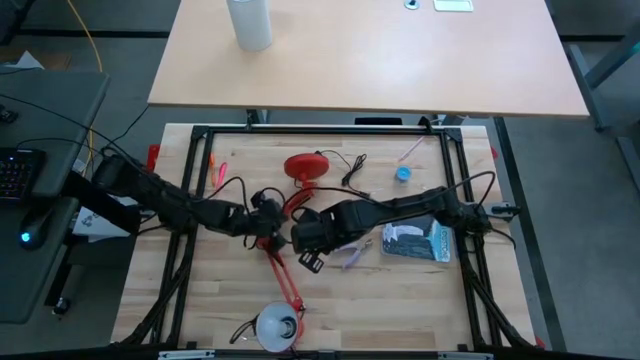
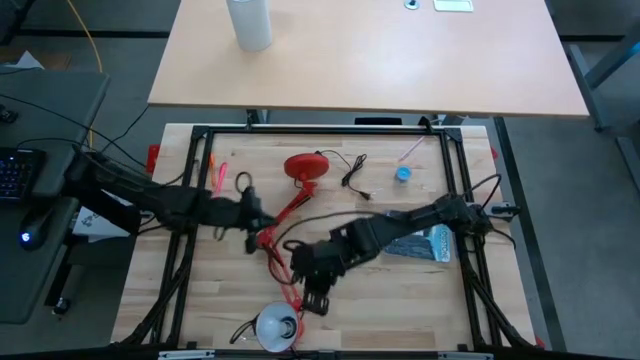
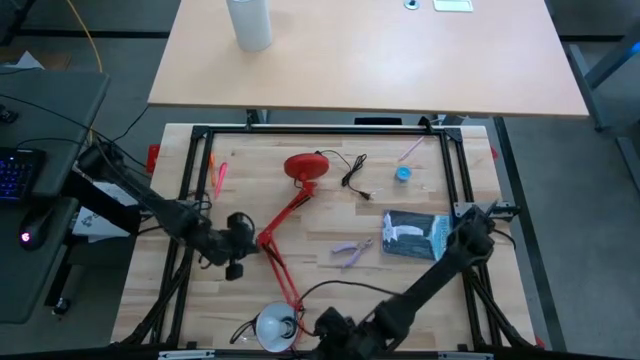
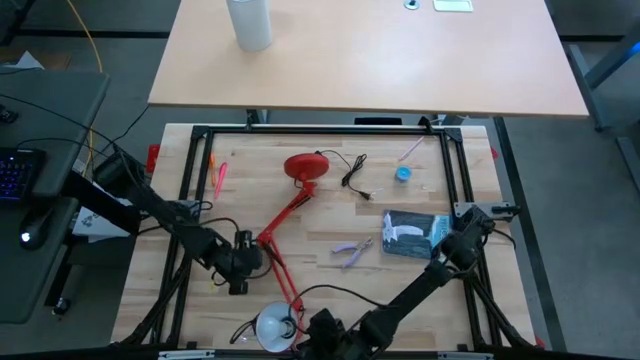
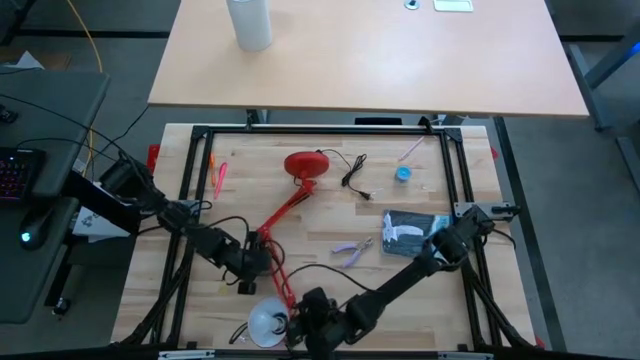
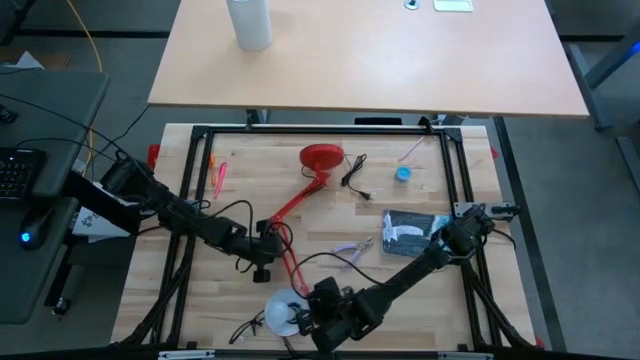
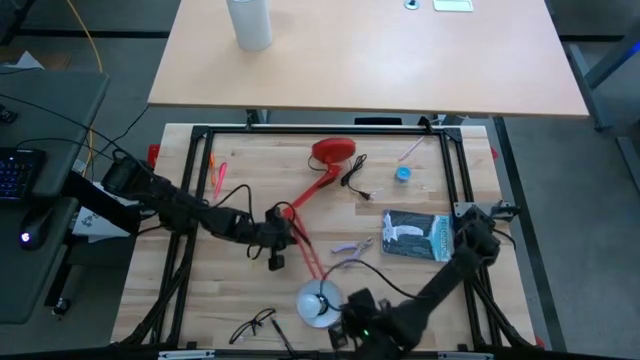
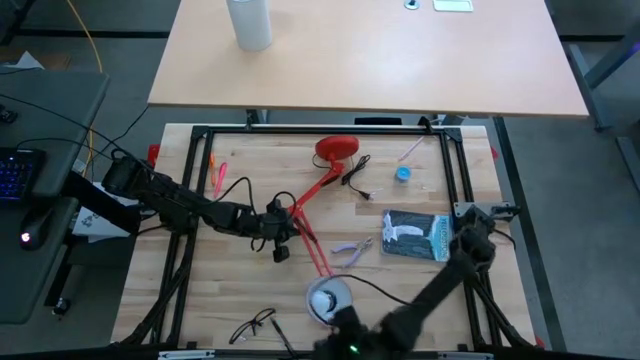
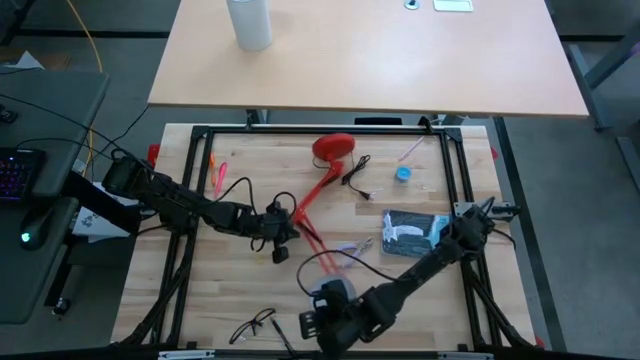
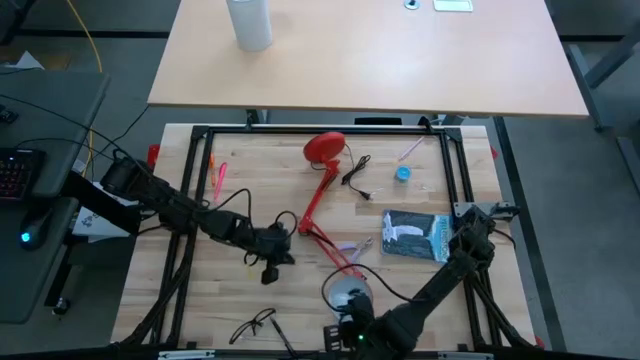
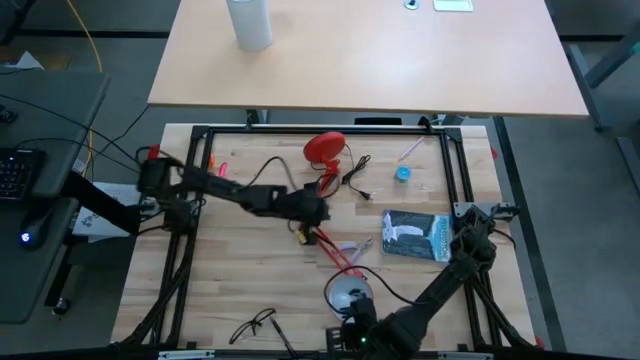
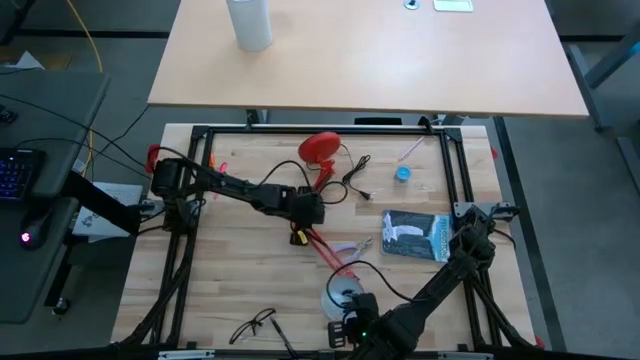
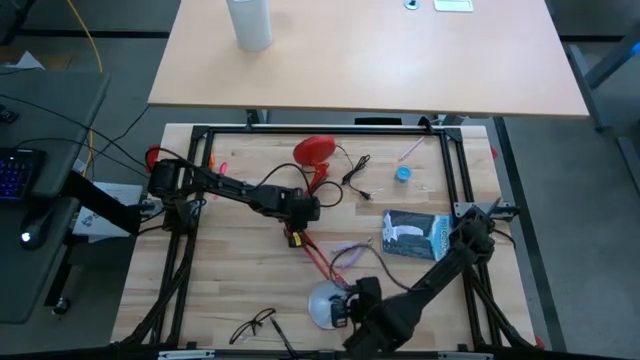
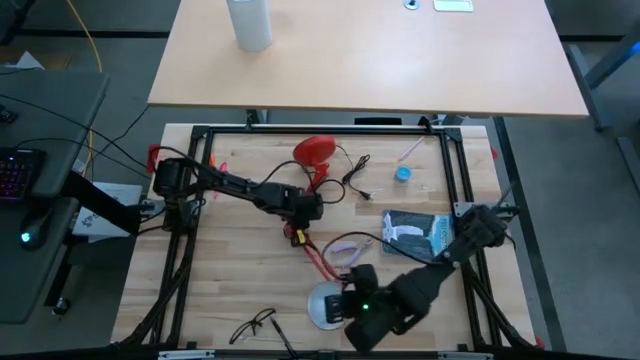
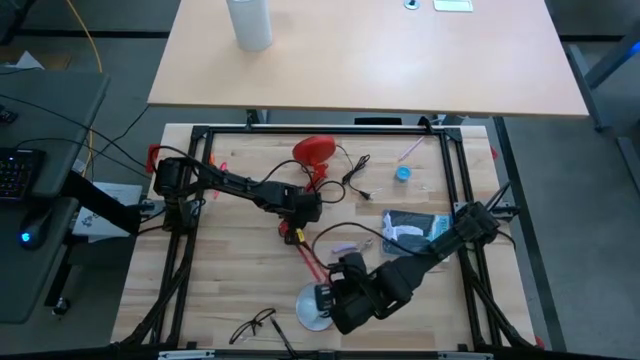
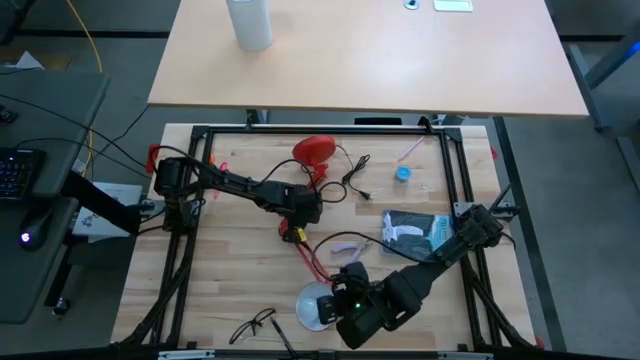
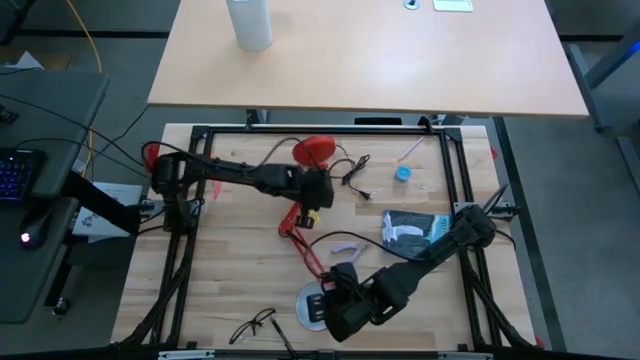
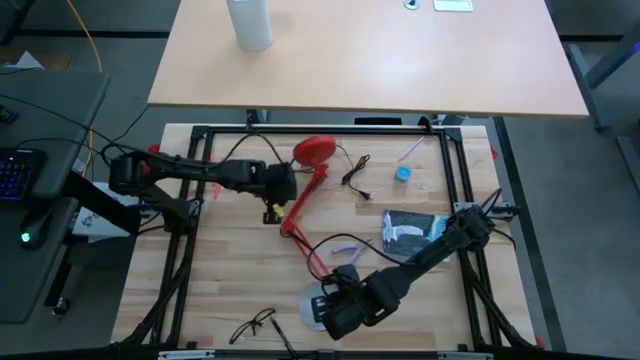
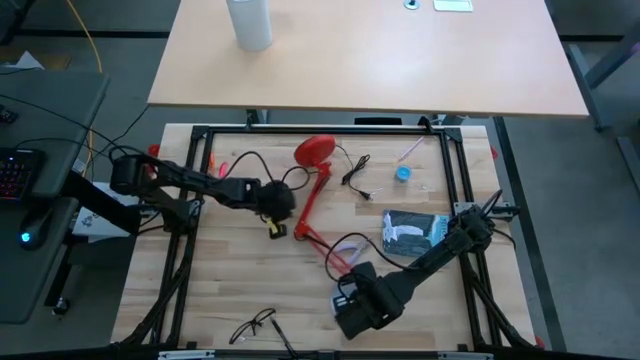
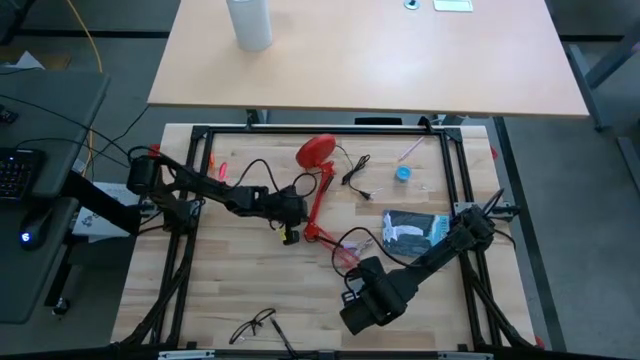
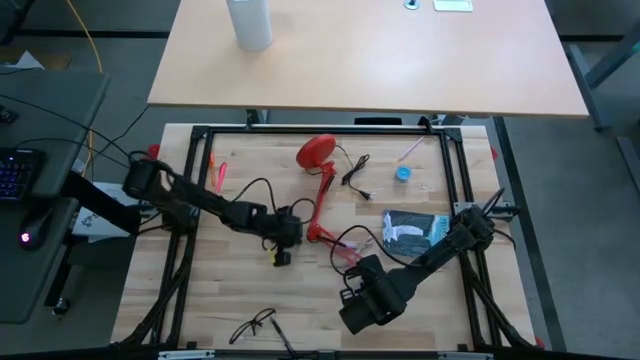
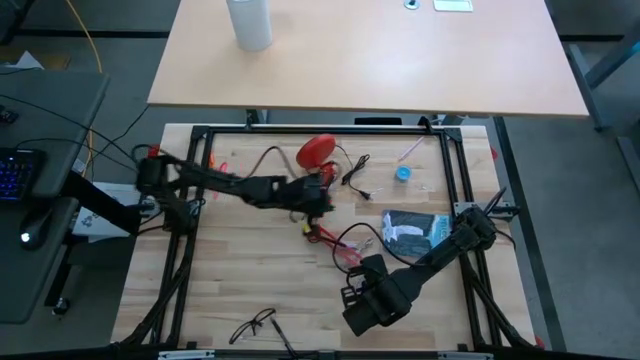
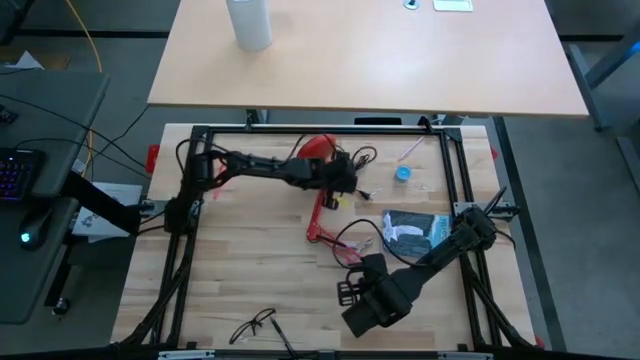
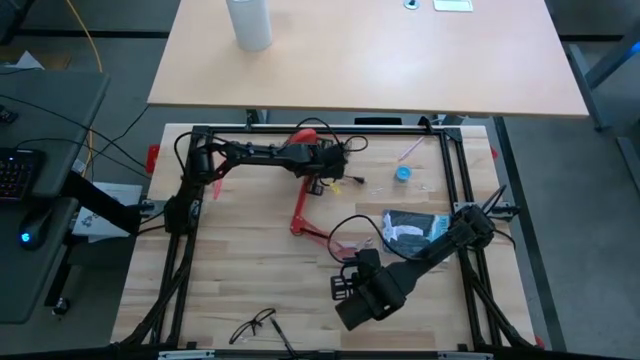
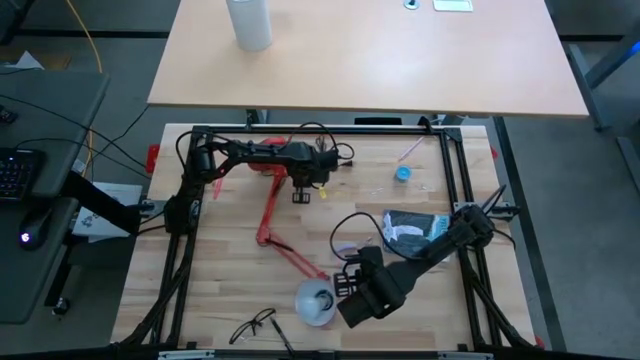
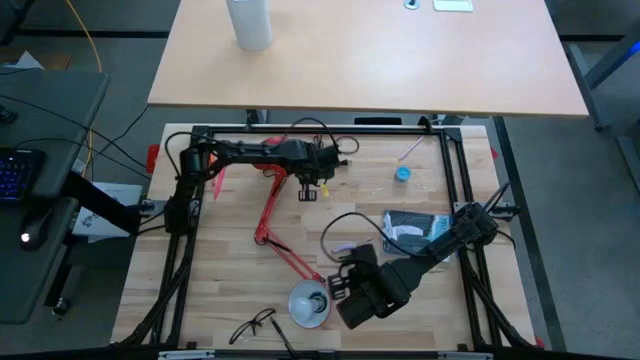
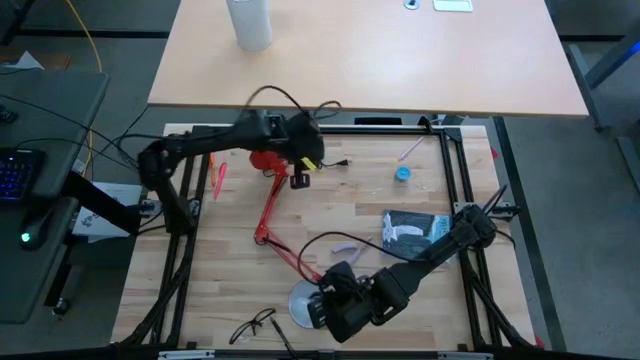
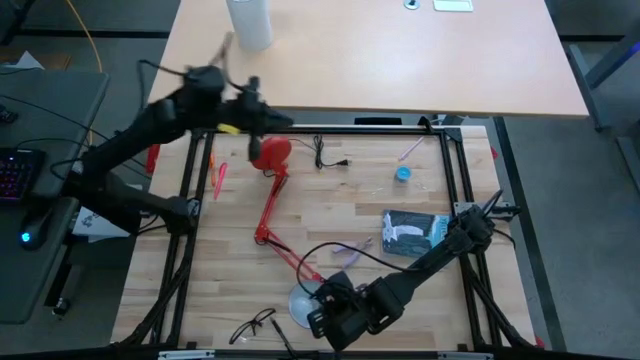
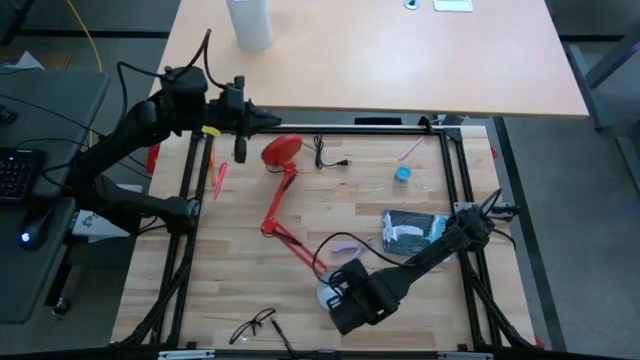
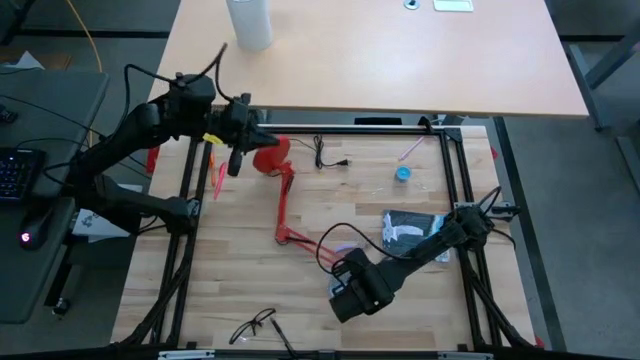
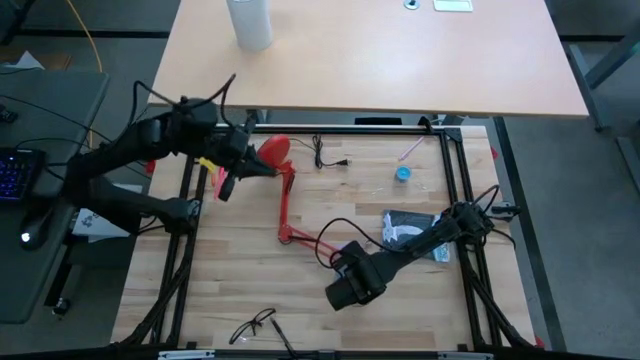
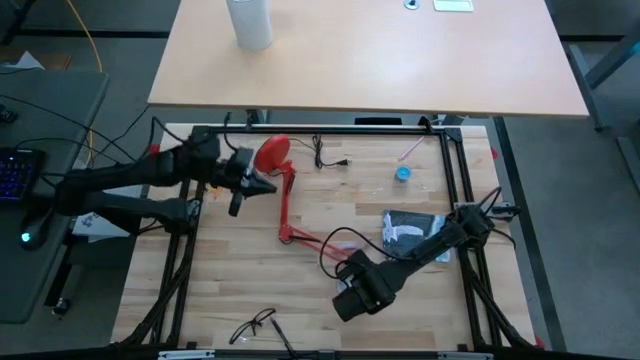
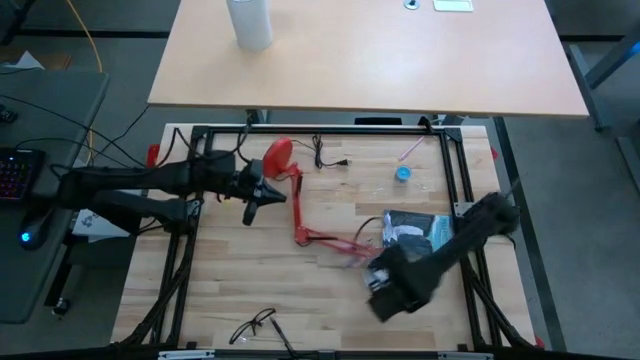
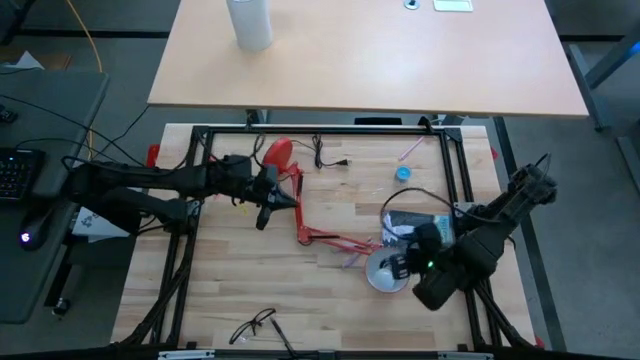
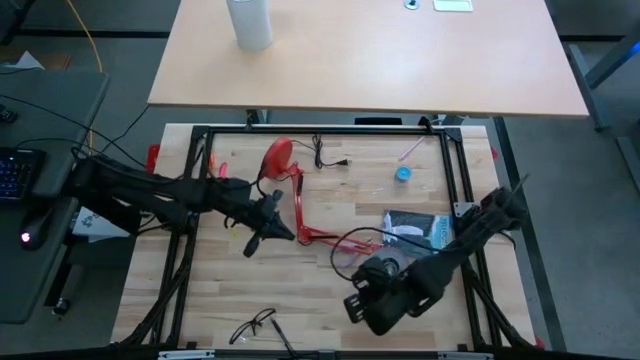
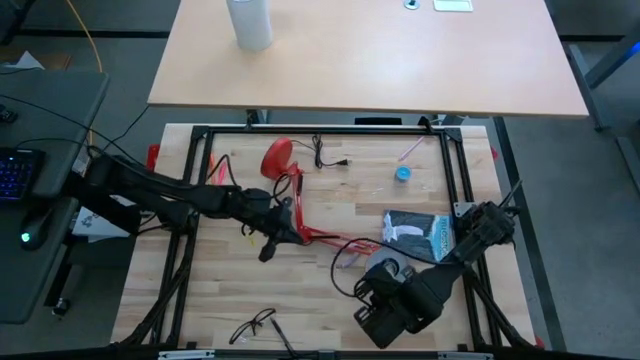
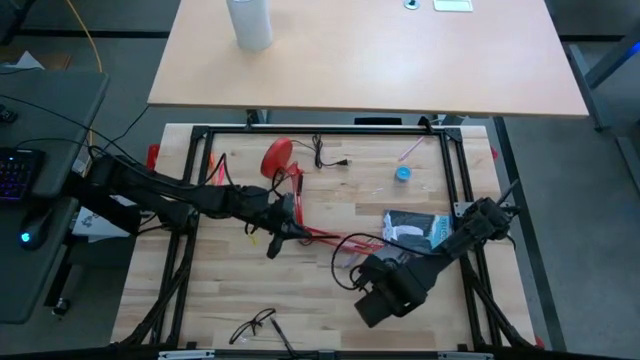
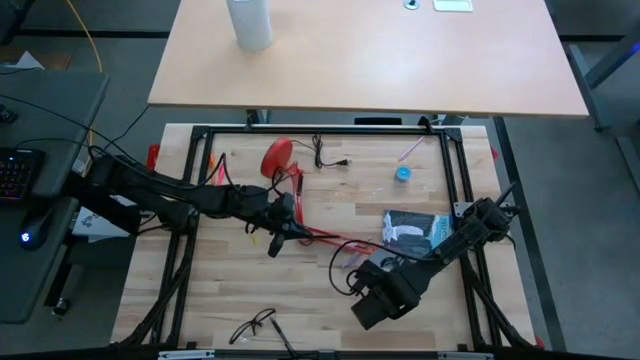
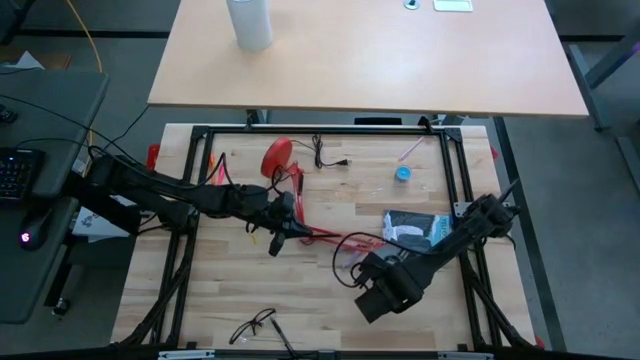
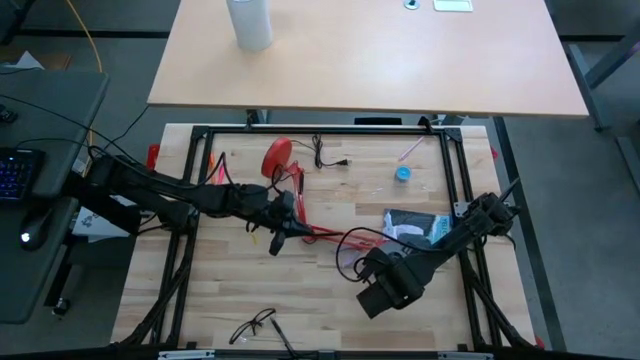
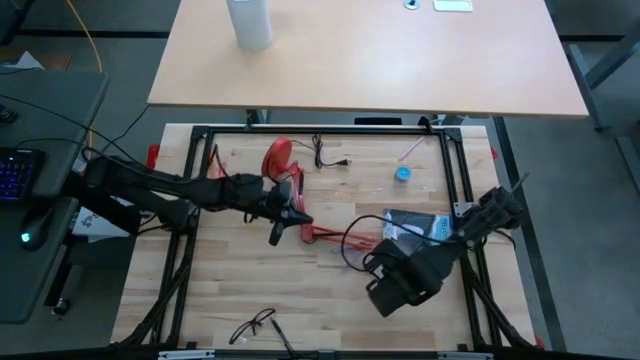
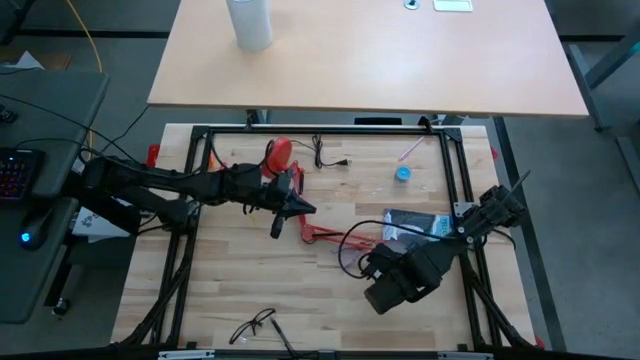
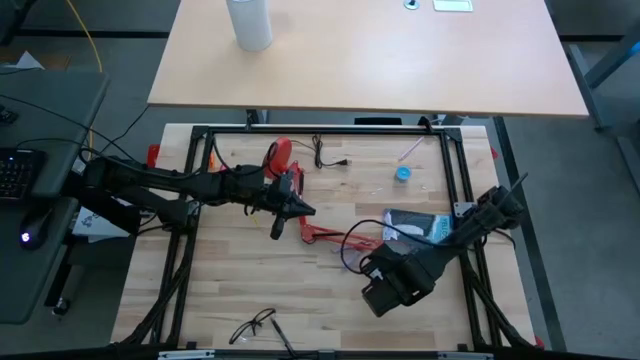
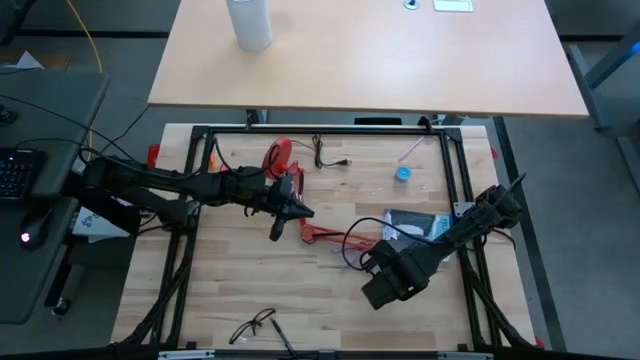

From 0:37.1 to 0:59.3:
Task: Screw lightbulb
Insert the lightbulb into the desk lamp

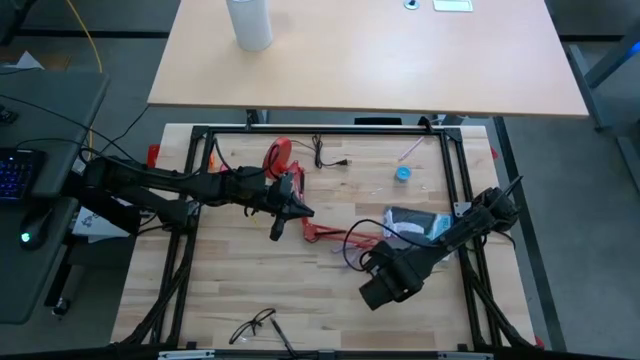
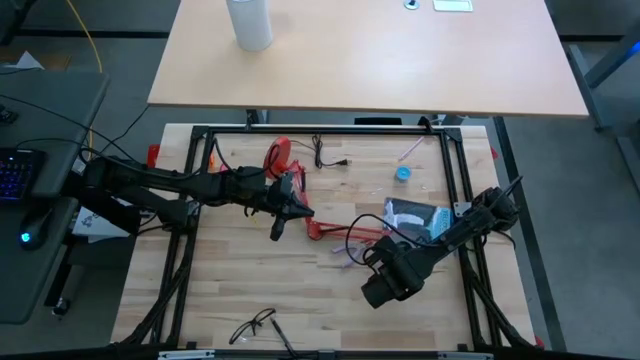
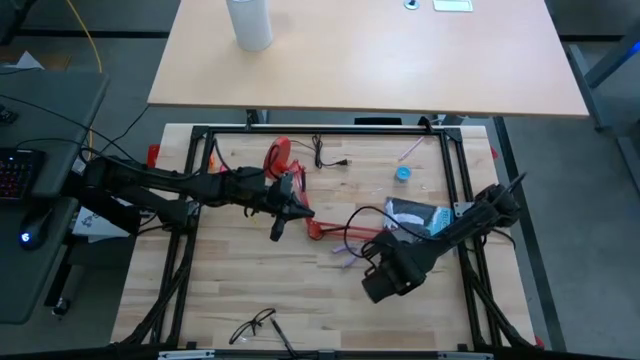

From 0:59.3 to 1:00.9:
Insert the lightbulb into the desk lamp
